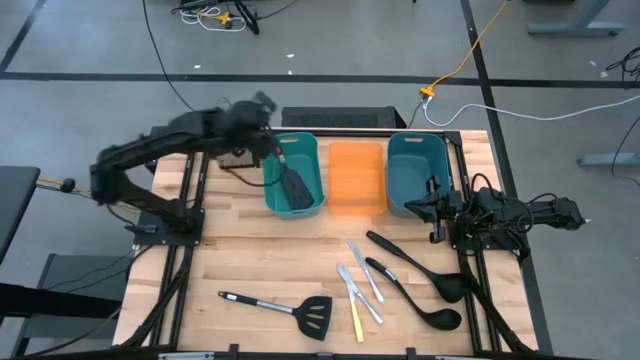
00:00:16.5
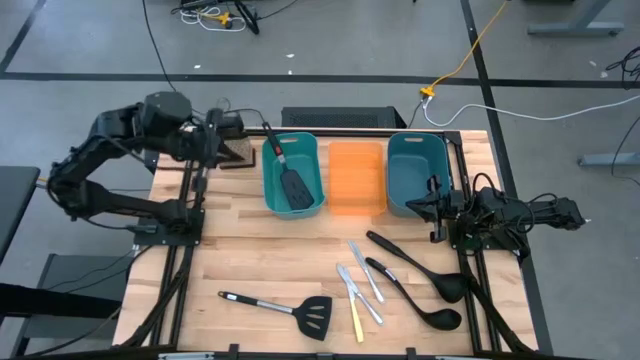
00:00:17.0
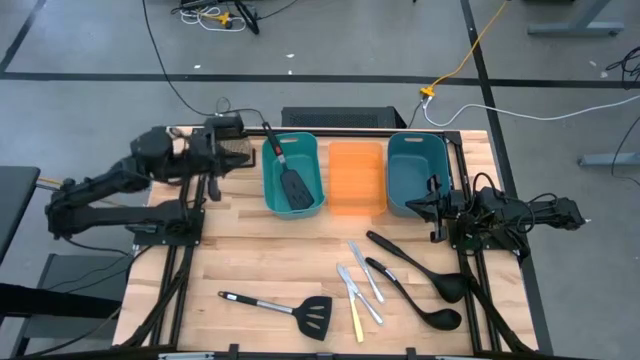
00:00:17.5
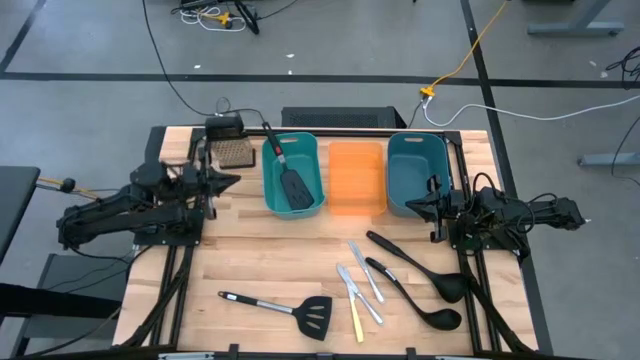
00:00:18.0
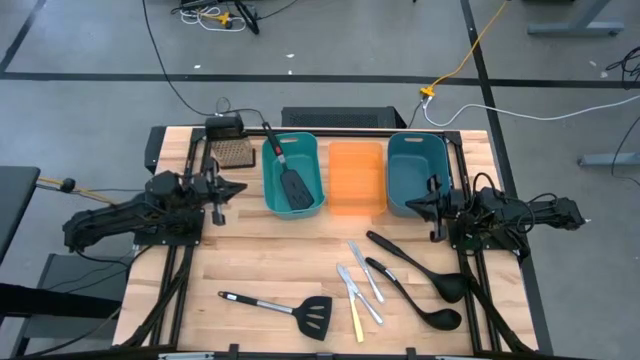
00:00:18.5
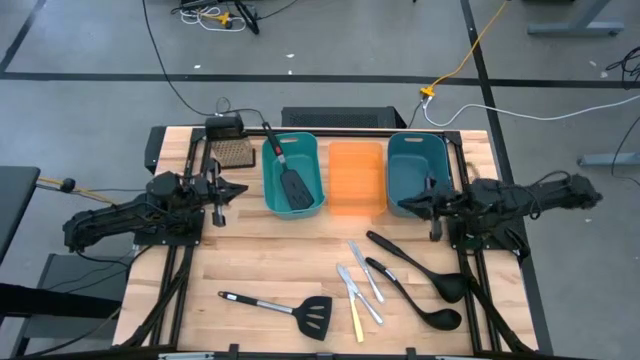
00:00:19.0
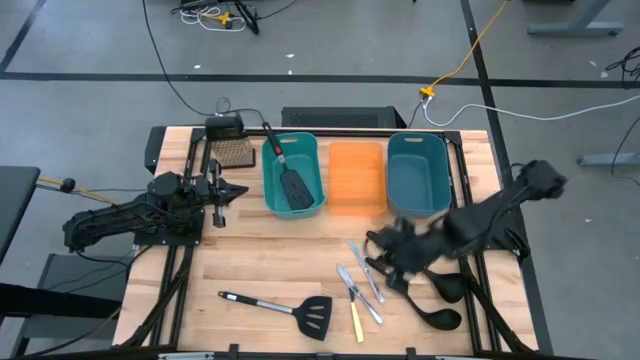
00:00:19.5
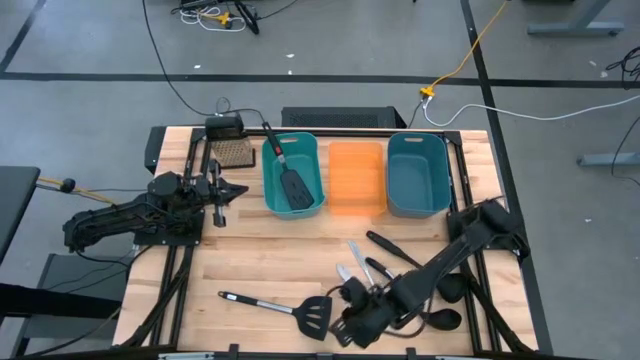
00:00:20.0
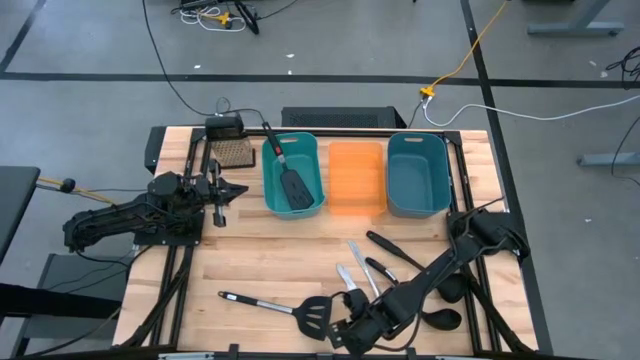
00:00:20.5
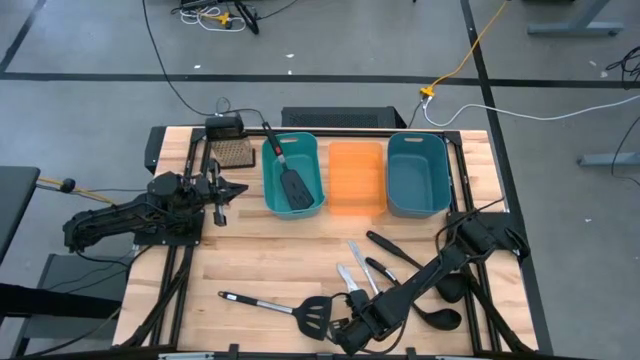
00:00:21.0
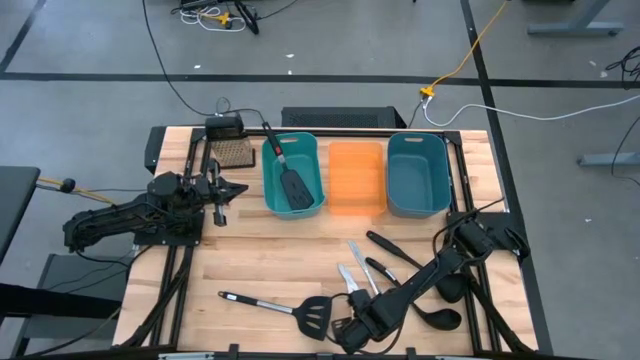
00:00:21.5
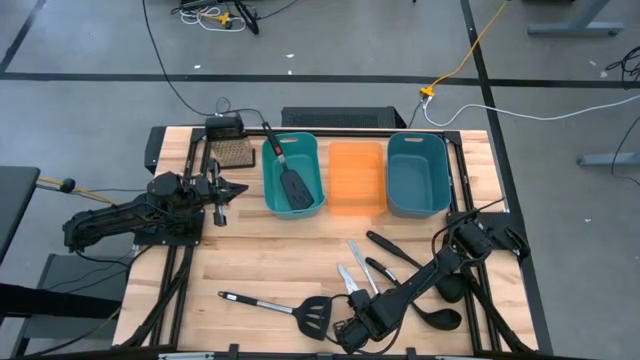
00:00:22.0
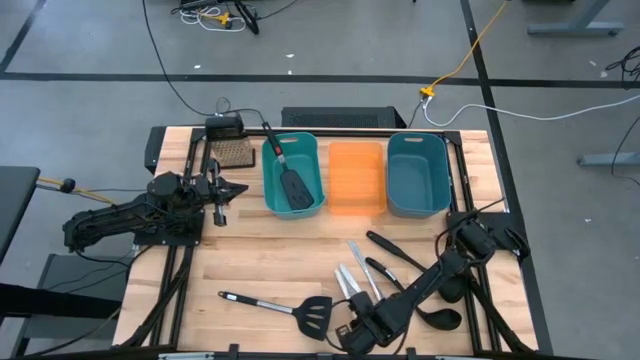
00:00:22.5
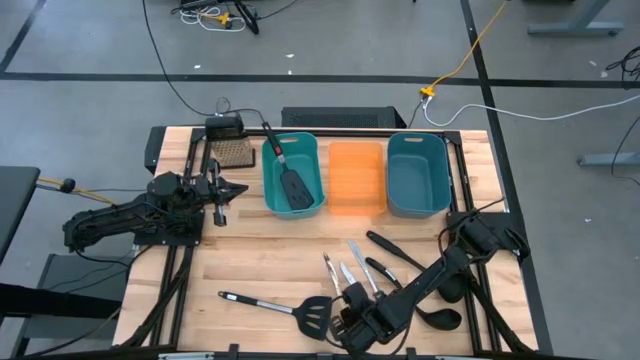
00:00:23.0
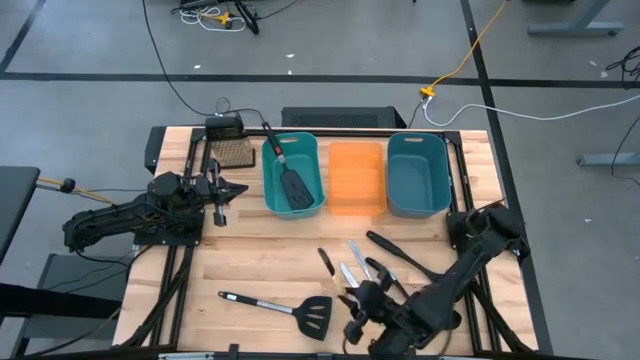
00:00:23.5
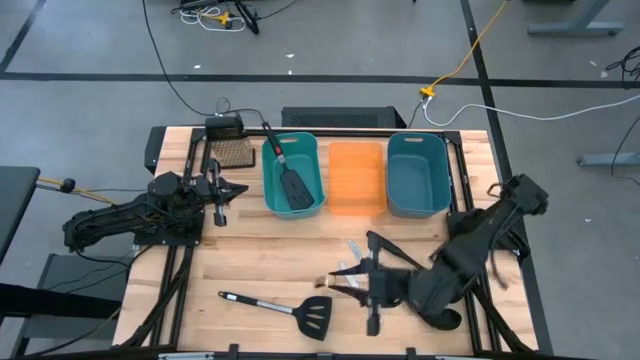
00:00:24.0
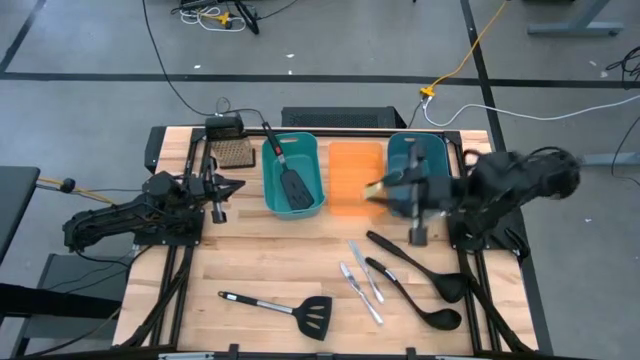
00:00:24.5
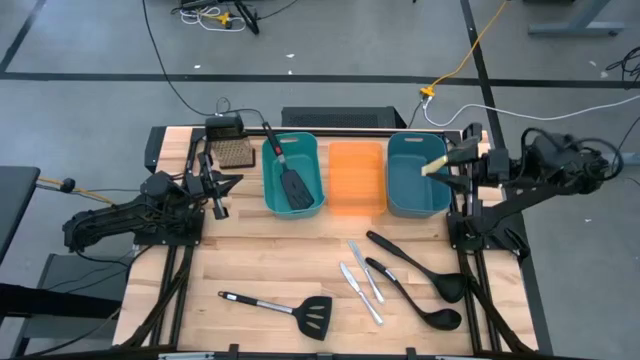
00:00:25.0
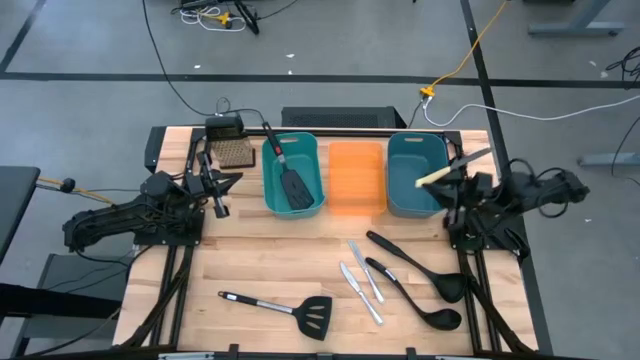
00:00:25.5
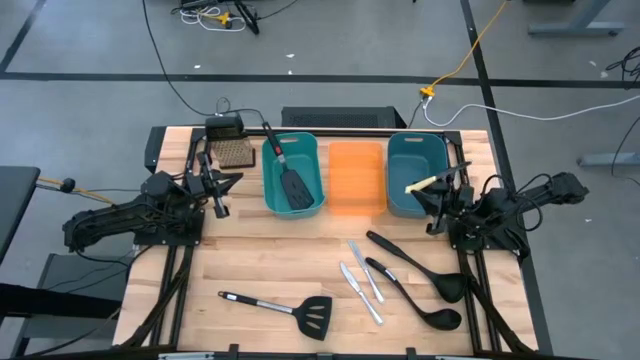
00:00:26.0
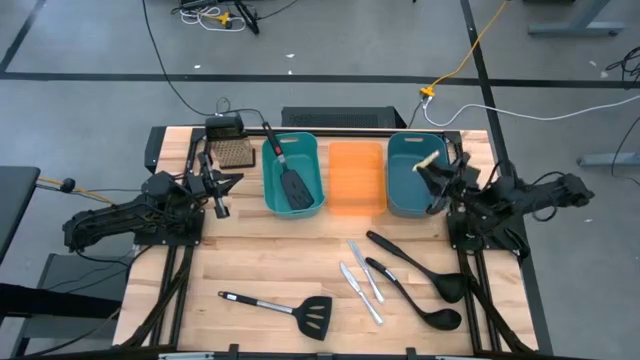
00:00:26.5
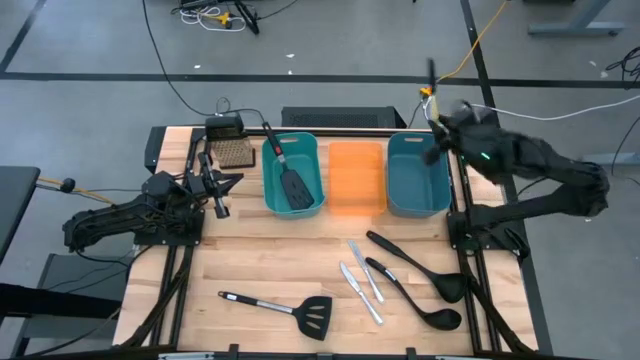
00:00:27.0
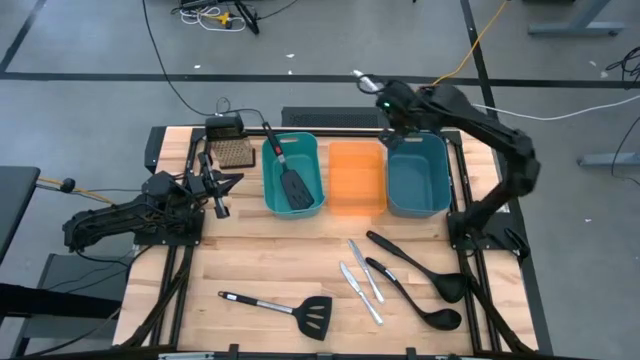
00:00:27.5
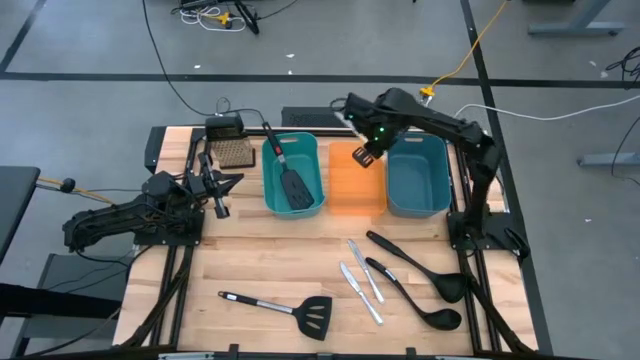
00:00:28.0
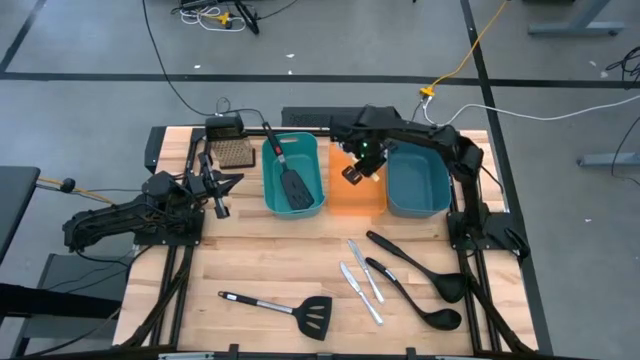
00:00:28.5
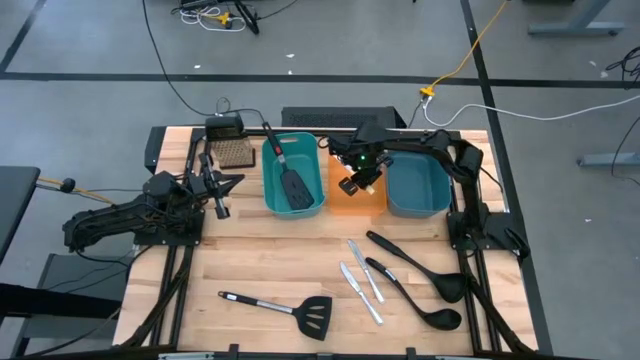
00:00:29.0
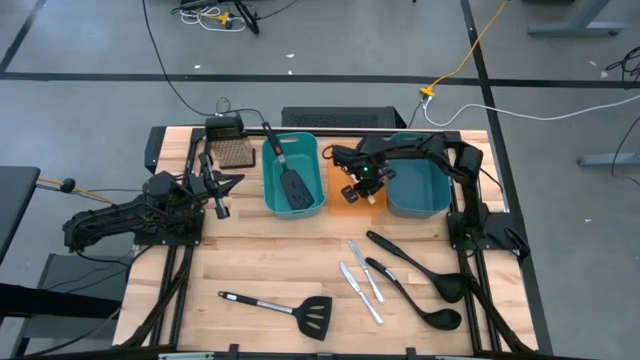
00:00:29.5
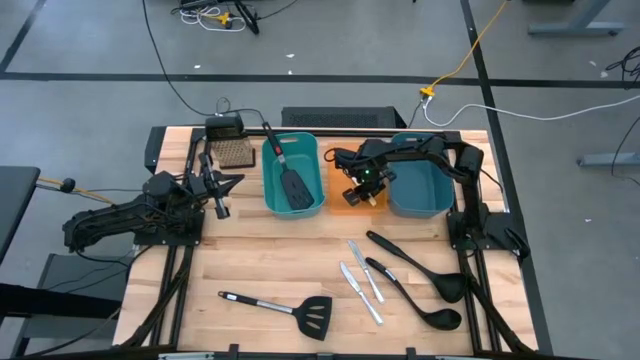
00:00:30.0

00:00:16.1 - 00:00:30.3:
Task: Pick & Place Kitchen Items
Put the yellow knife into the orange container

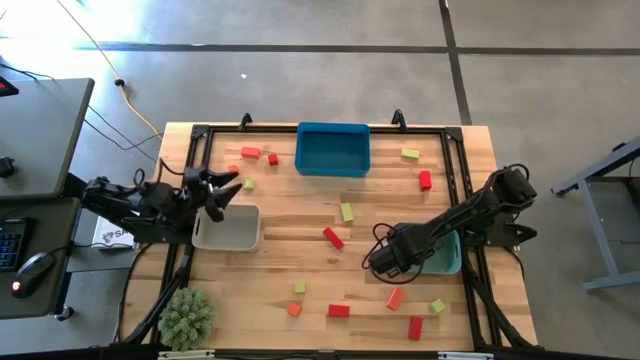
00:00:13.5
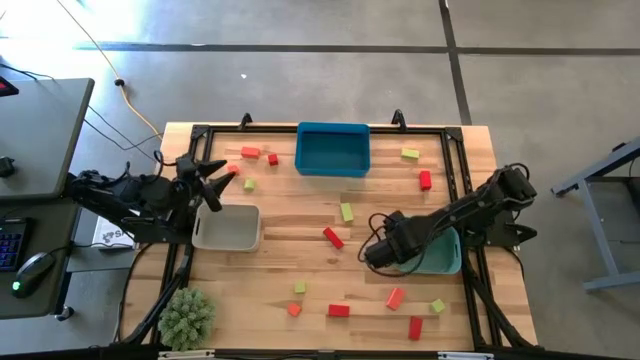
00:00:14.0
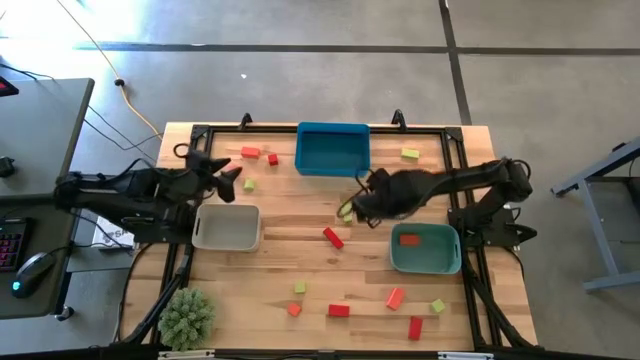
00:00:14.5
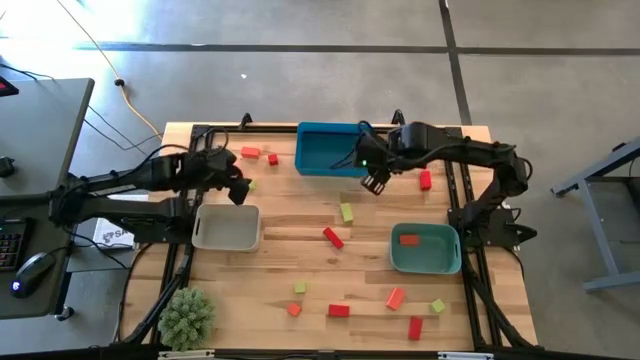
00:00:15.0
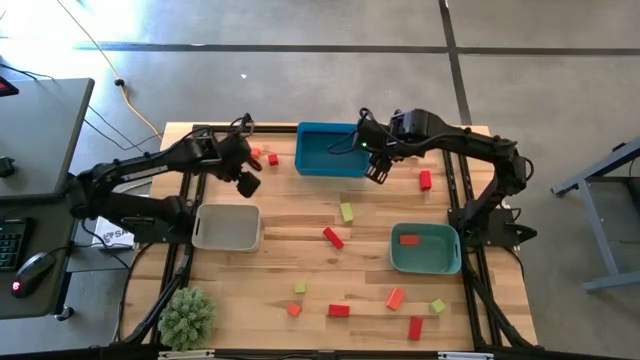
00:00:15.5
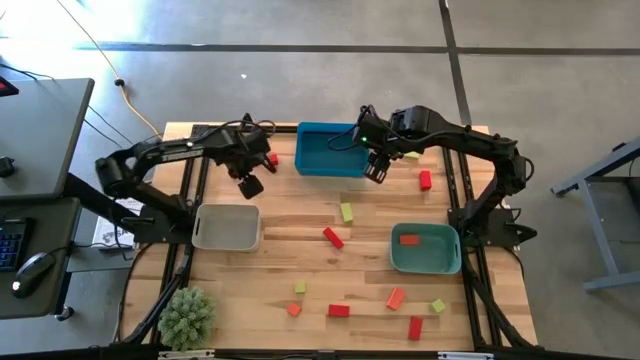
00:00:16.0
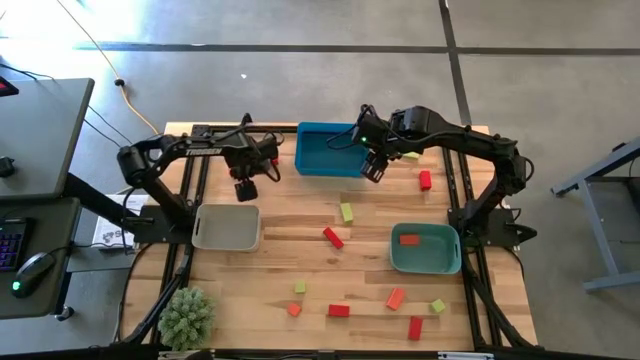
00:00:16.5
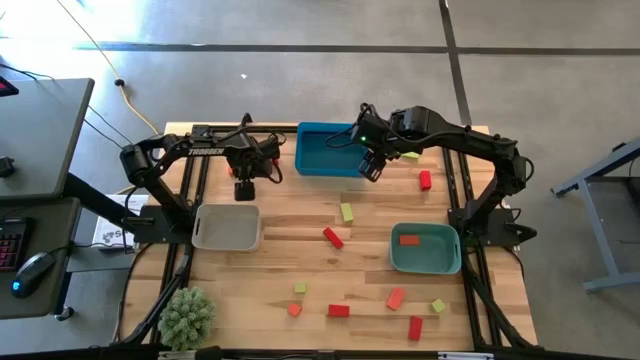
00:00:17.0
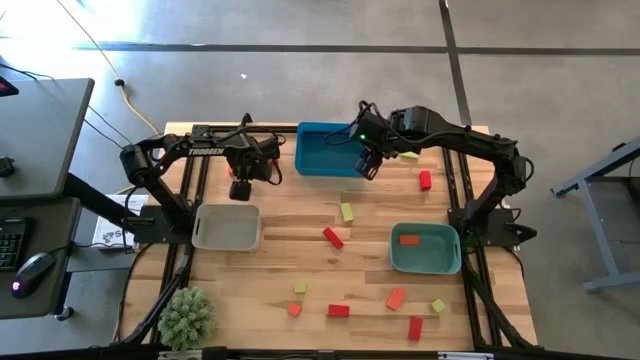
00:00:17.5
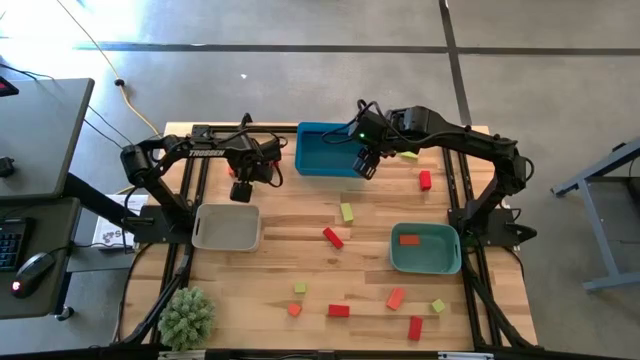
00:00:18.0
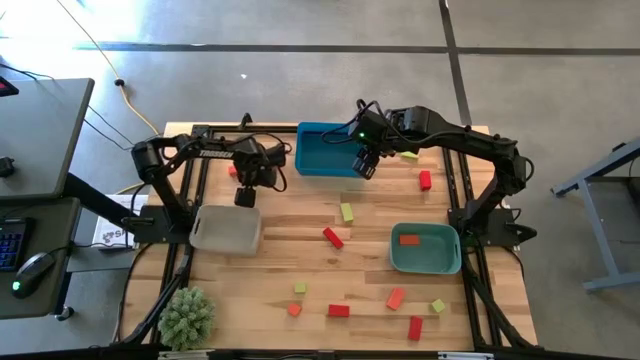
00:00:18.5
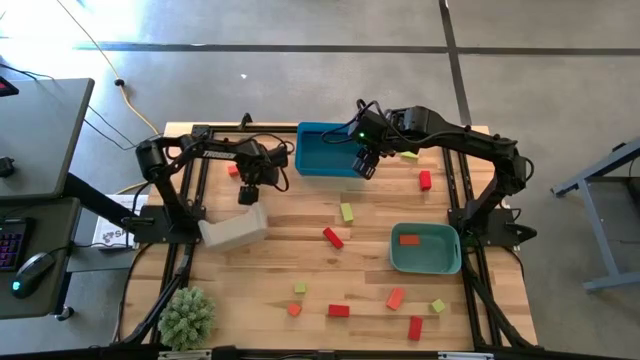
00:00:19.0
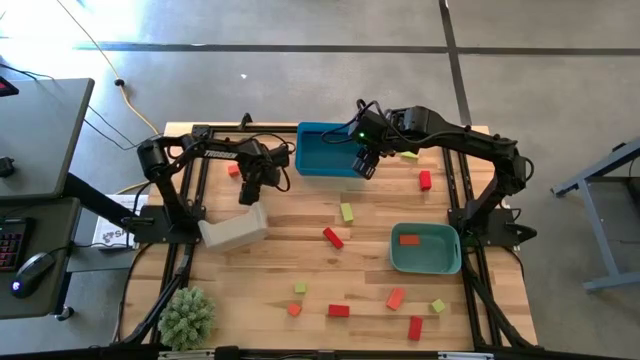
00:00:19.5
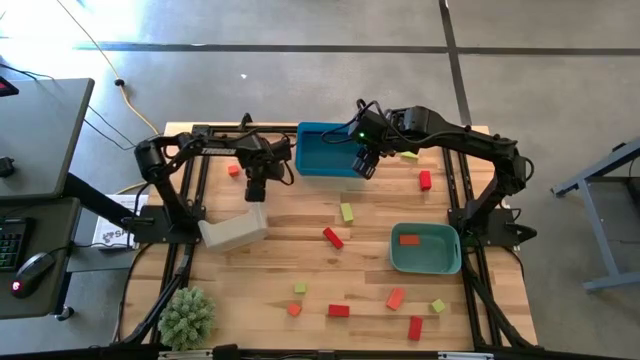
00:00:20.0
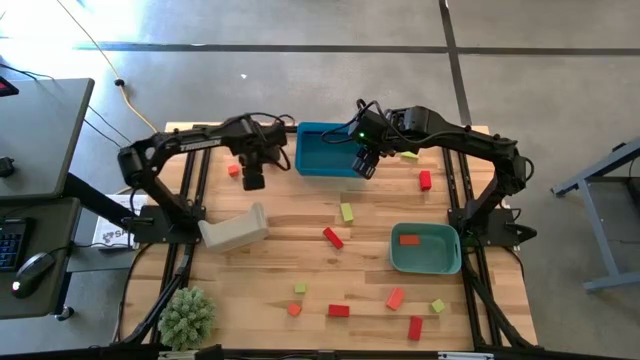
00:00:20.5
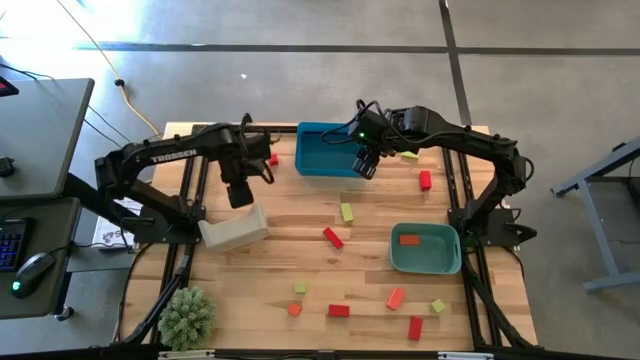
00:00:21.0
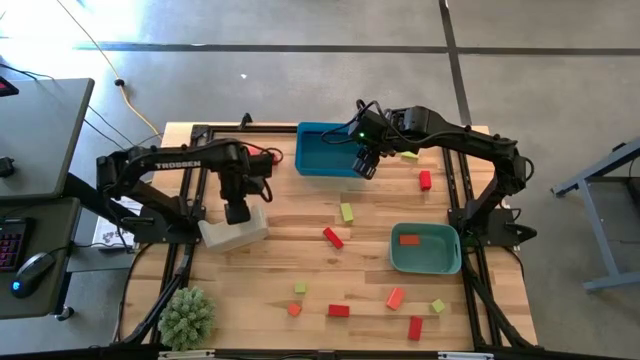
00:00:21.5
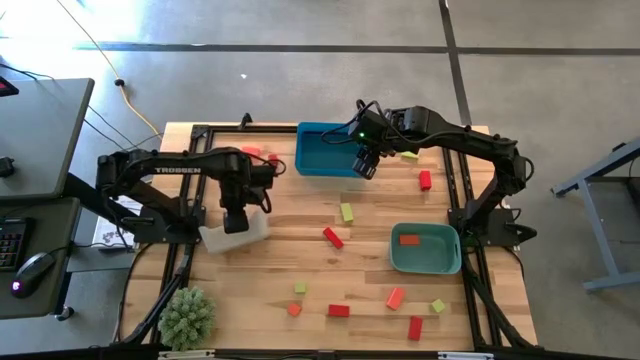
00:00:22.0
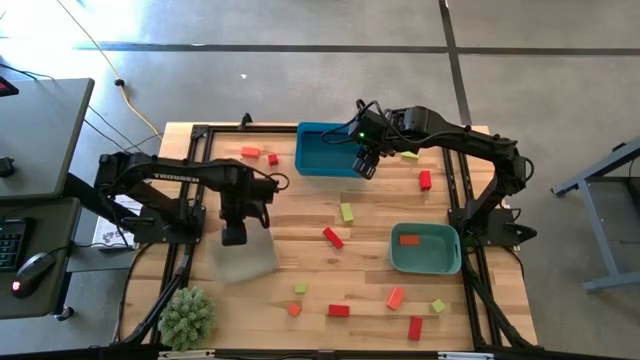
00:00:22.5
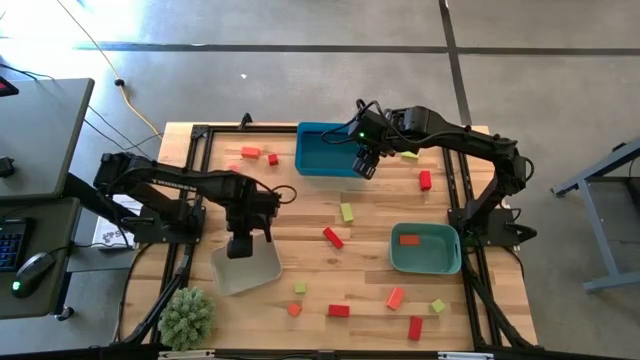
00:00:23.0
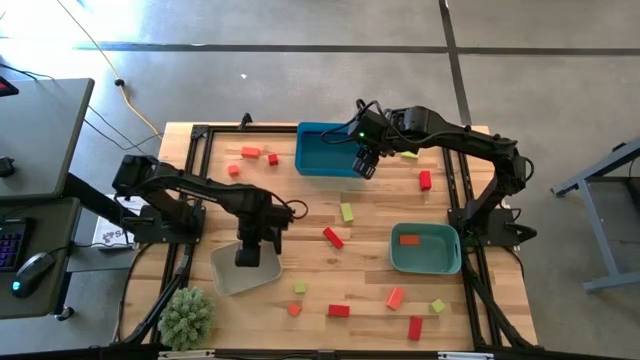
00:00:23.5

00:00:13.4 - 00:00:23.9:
Task: Sort & place blocks by color
Put the top left green block into the white bin
